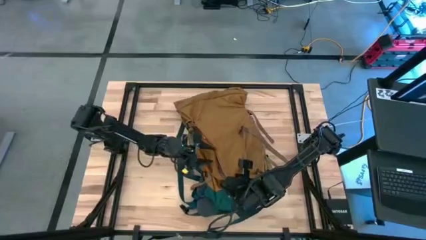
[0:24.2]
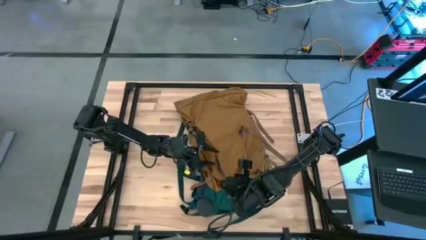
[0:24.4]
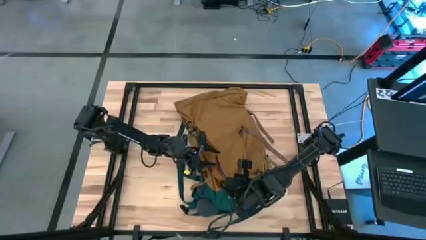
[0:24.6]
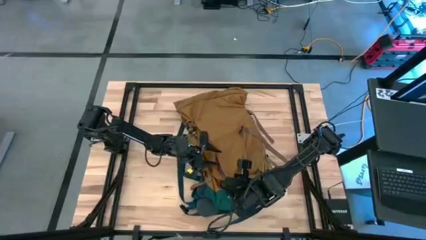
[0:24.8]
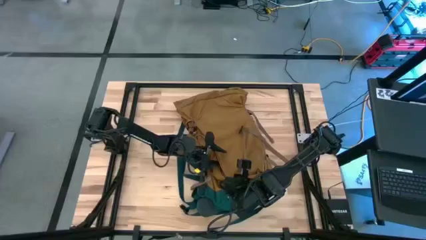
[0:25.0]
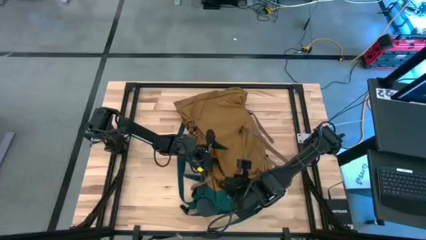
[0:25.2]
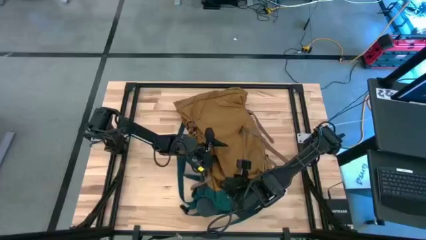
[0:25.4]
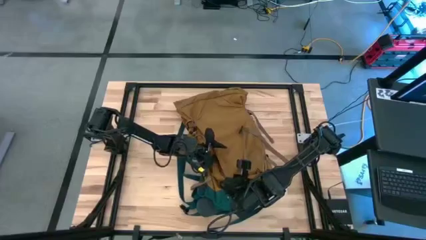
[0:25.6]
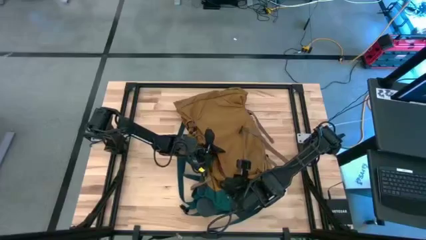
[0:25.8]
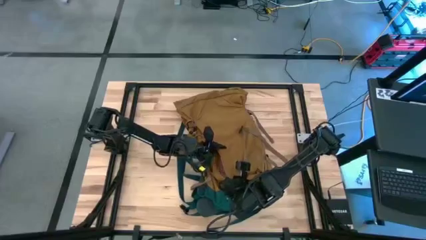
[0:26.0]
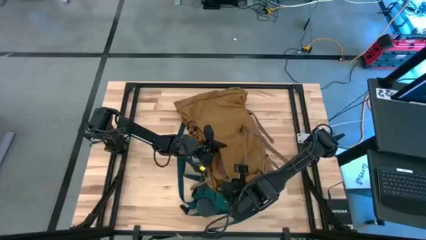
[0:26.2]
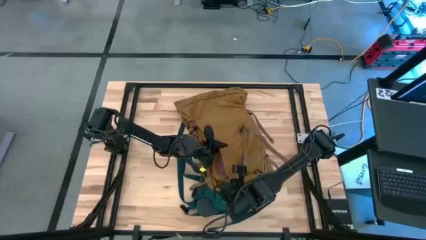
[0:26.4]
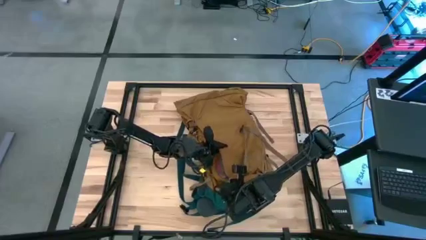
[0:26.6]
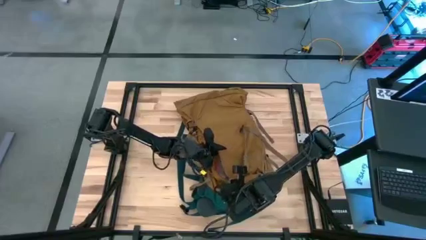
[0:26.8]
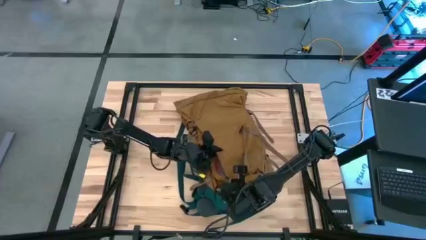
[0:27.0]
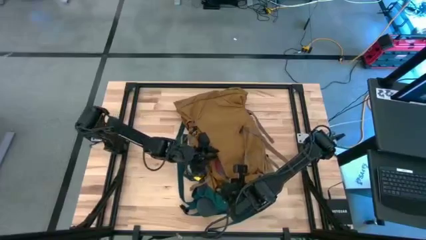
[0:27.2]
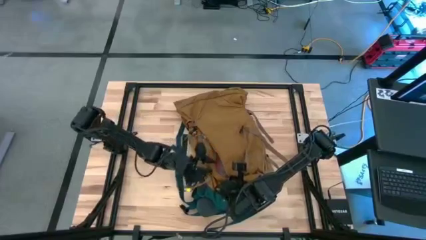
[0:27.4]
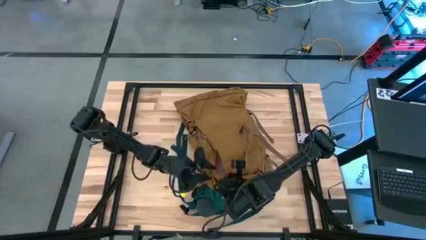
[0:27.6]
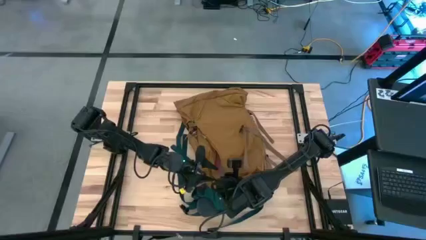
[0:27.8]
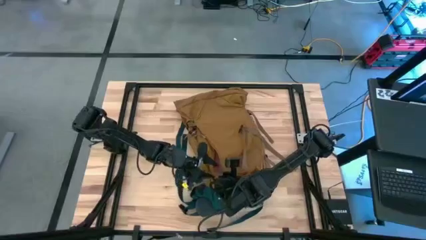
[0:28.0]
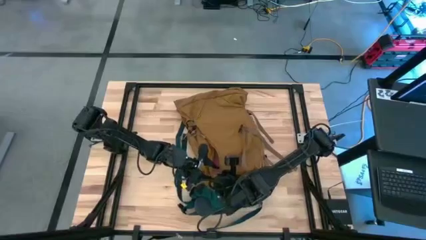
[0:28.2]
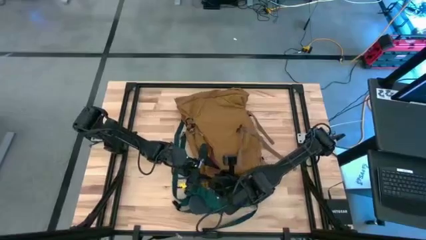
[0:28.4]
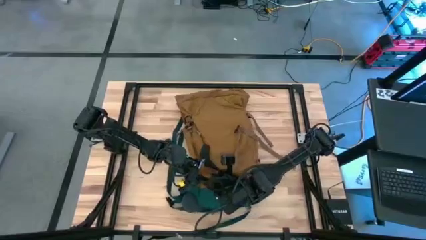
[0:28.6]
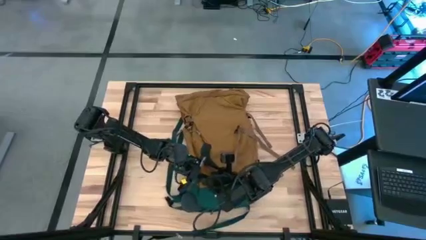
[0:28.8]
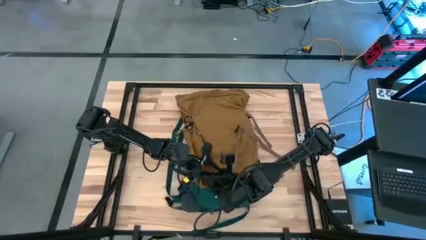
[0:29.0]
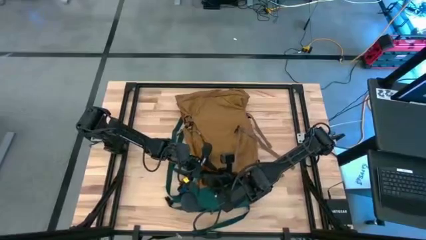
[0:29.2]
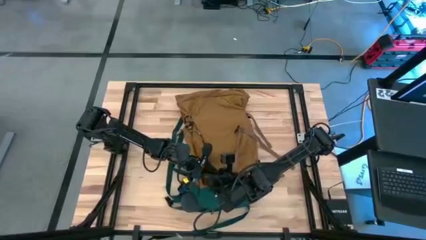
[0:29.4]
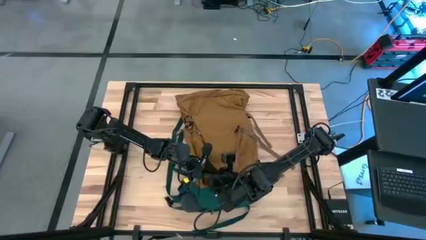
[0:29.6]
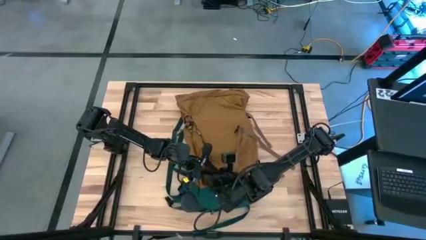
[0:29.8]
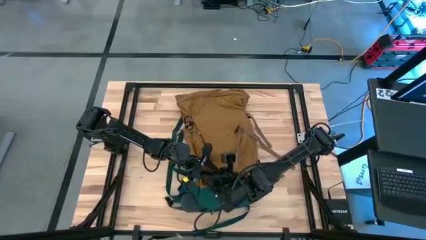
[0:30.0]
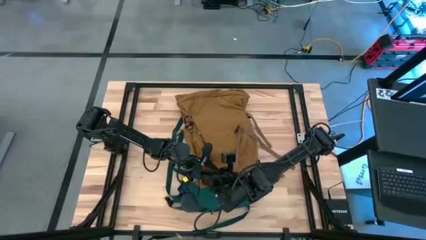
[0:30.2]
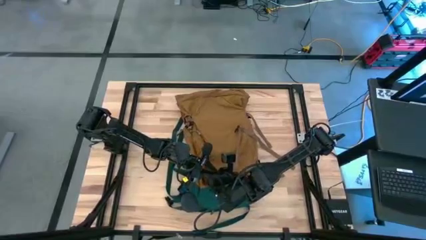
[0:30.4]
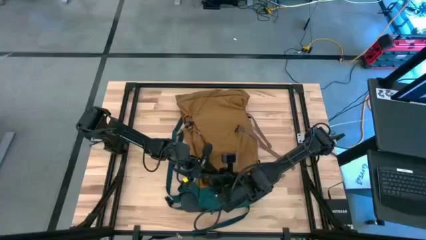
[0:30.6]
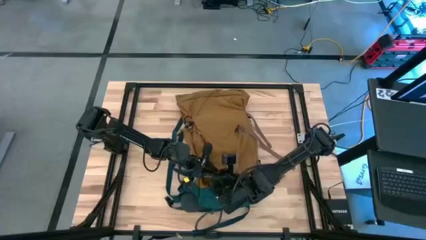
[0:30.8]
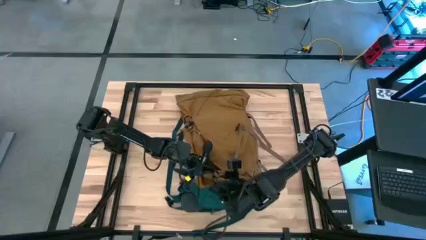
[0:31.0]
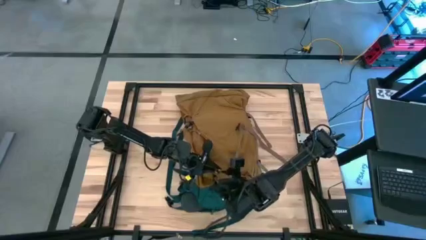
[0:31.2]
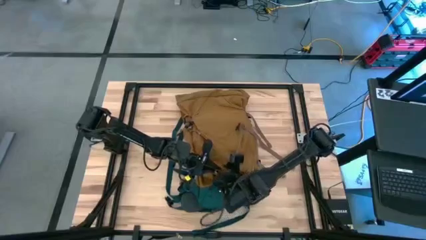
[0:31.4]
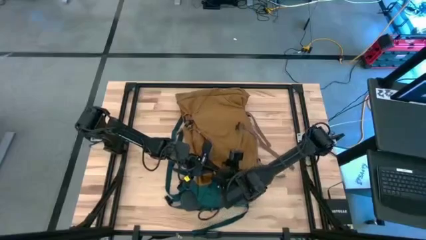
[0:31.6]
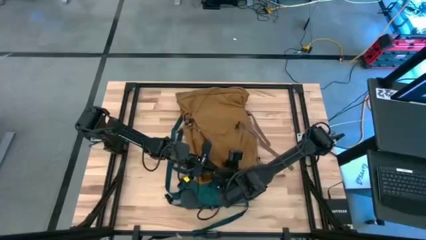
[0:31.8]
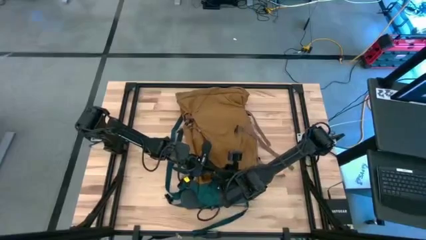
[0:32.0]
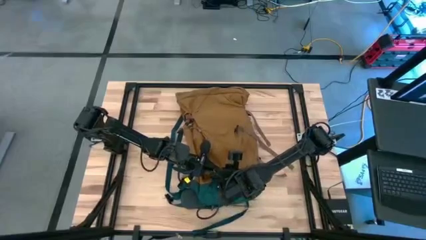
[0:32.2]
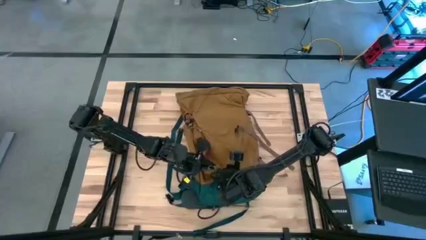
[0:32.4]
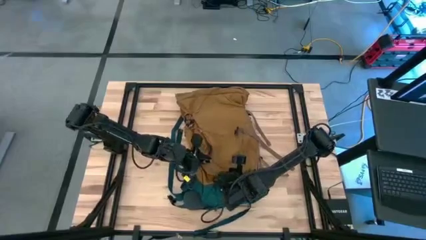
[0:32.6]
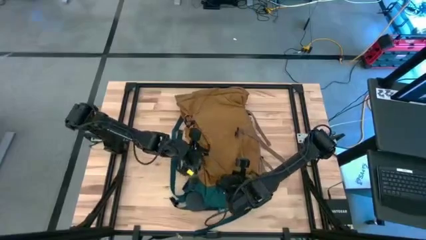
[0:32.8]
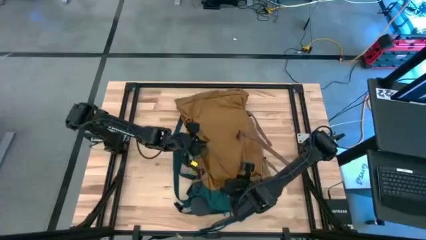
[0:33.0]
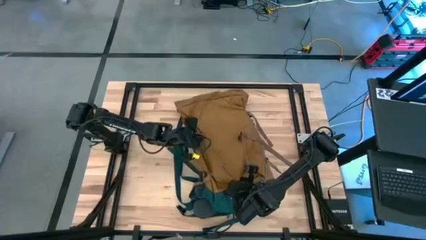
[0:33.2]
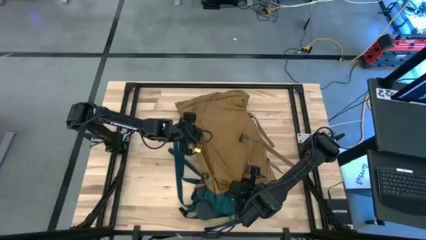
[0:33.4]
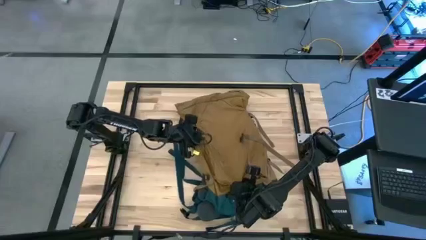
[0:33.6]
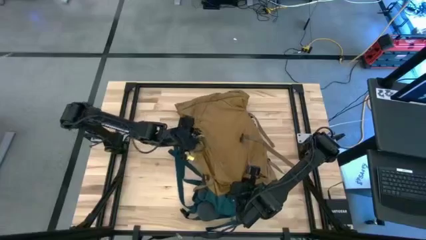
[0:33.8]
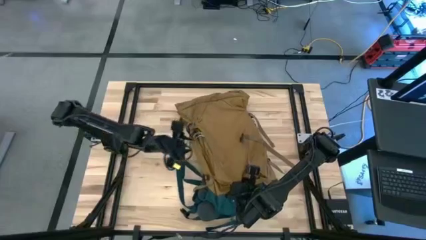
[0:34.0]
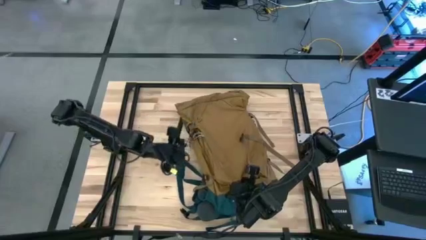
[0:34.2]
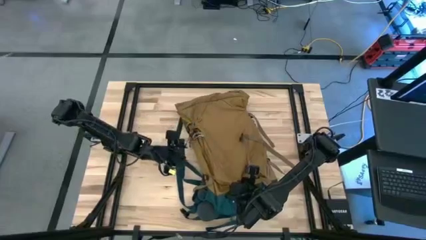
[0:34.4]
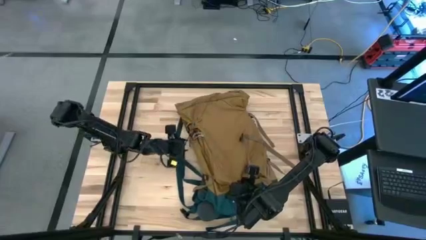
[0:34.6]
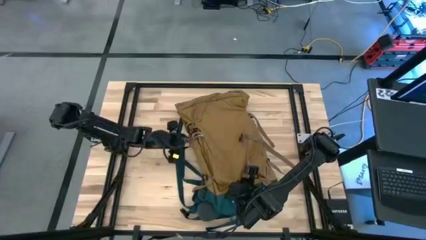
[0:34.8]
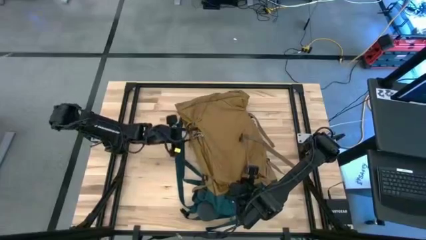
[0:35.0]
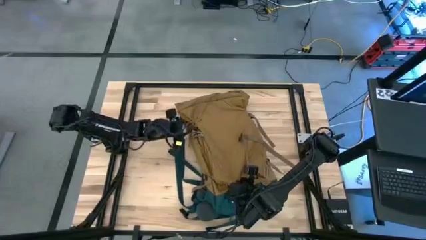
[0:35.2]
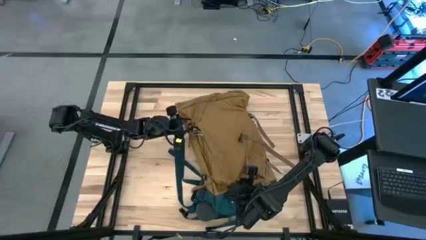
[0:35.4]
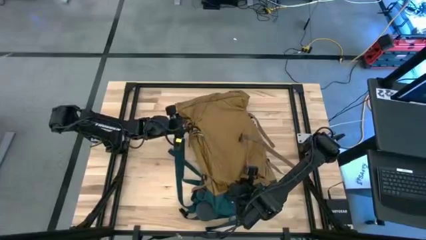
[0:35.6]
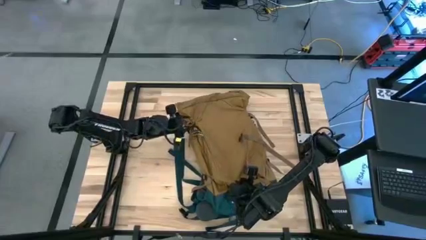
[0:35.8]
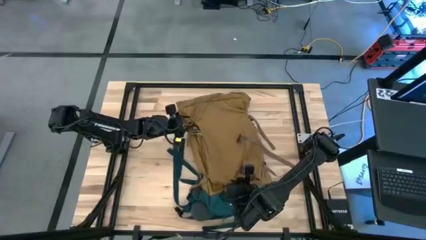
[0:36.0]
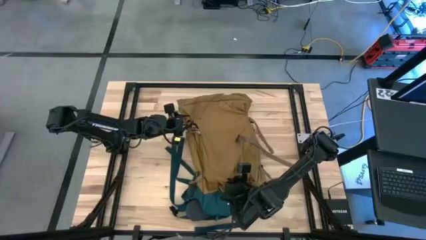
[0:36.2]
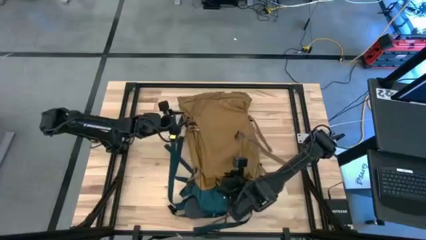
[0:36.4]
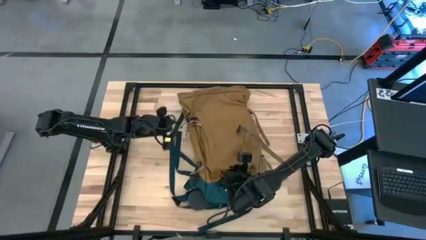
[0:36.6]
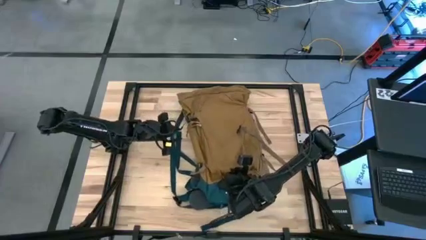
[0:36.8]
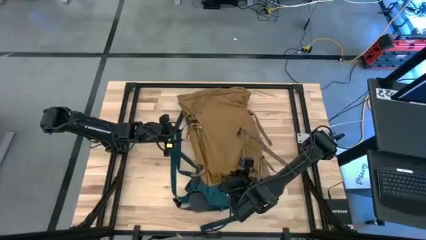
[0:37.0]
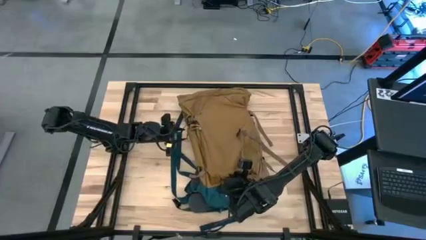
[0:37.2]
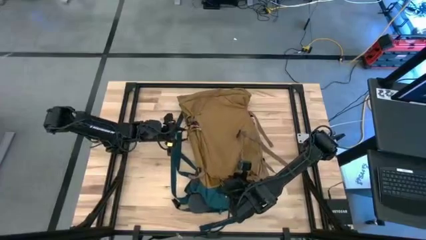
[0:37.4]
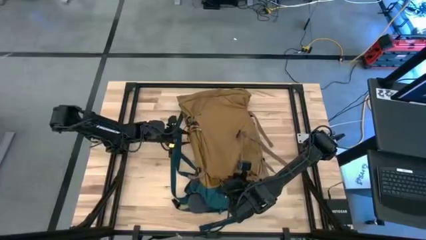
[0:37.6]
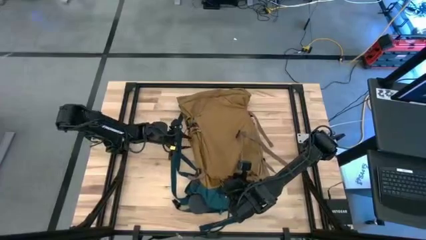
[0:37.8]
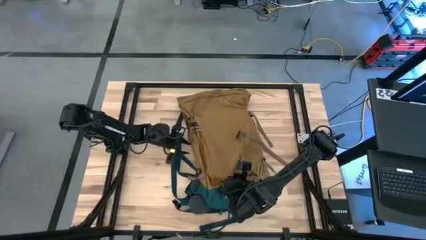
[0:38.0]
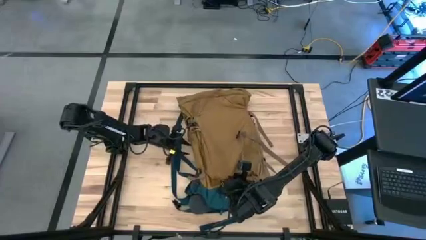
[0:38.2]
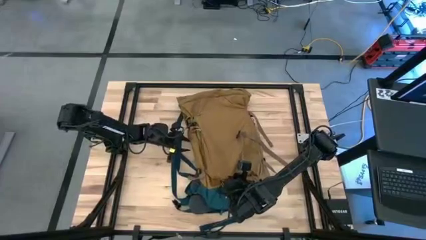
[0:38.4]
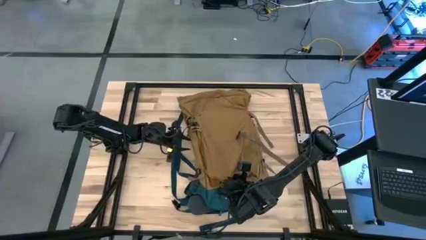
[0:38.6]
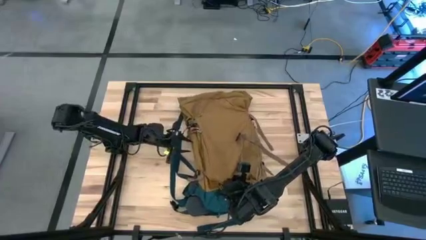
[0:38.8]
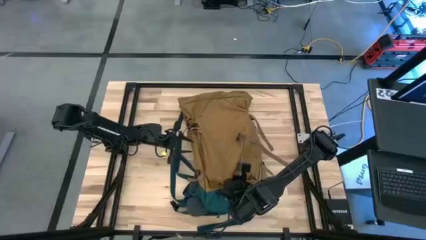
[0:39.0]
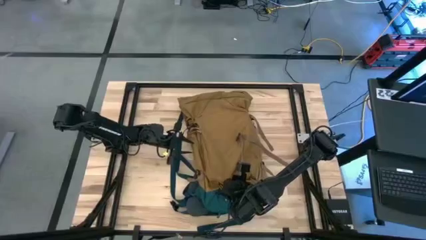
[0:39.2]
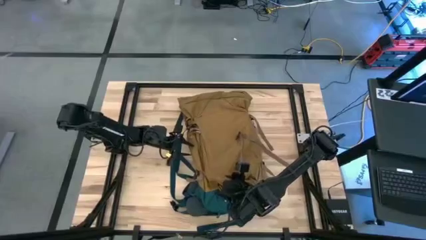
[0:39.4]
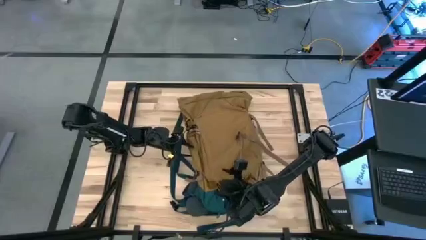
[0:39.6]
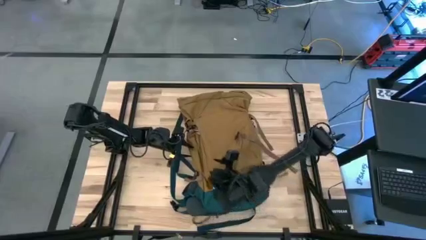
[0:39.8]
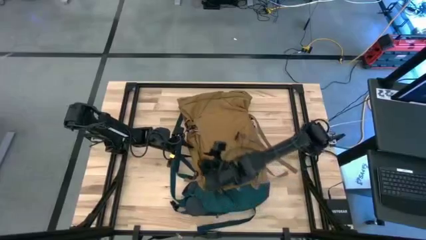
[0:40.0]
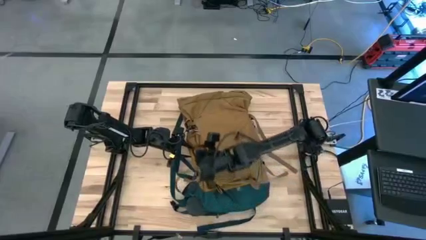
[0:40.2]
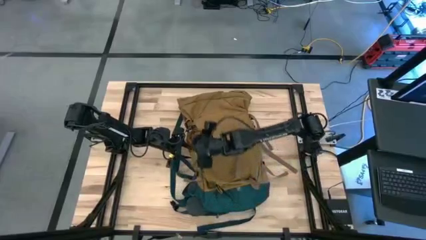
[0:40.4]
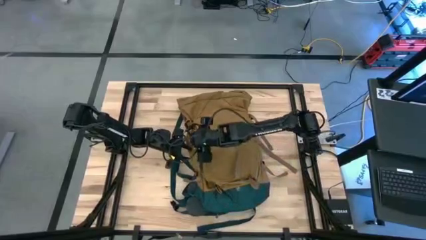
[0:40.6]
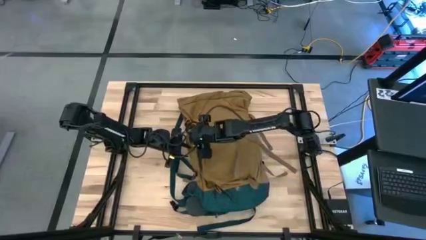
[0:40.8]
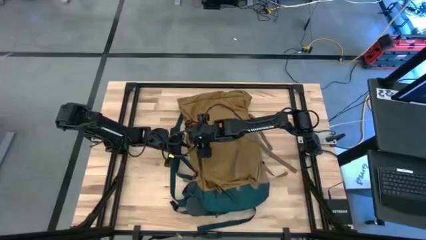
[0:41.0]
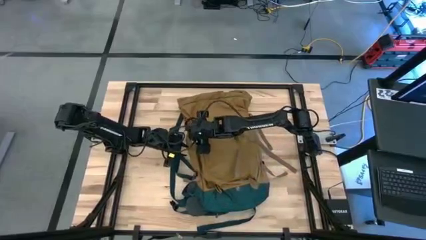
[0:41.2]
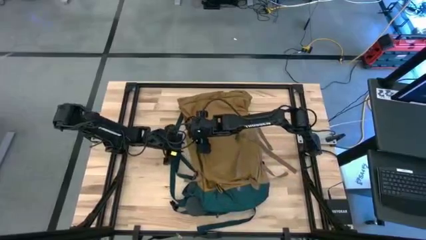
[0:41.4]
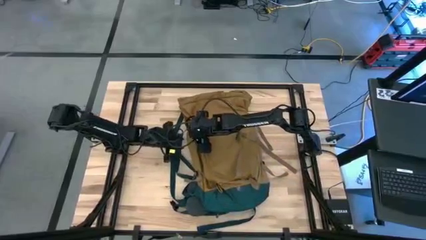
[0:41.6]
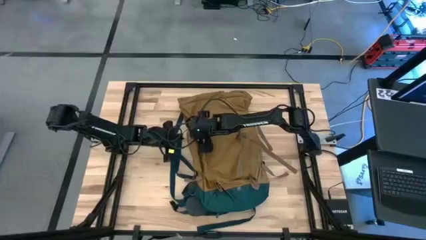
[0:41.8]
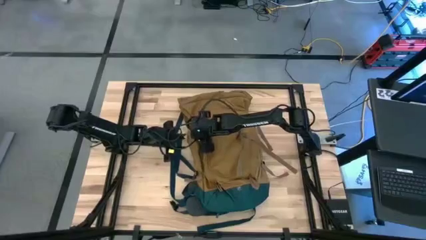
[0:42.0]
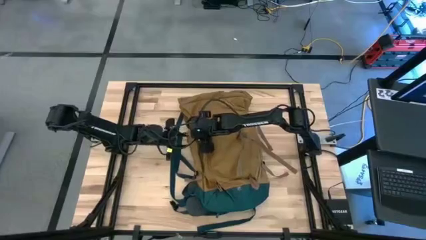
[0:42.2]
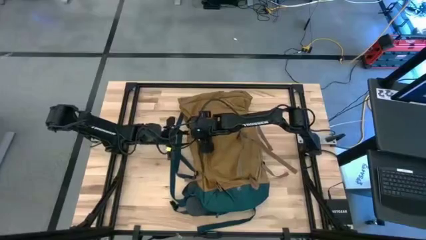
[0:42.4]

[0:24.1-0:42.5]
Task: Unpack backpack
Open the brown backpack
